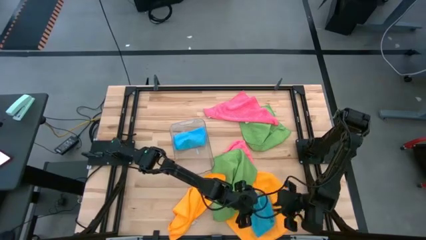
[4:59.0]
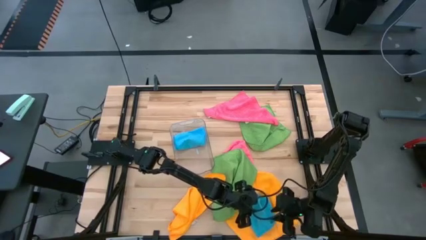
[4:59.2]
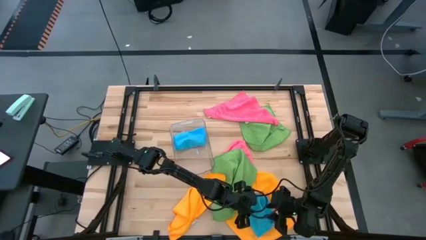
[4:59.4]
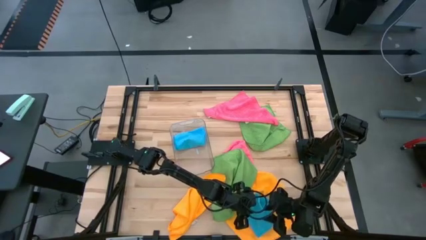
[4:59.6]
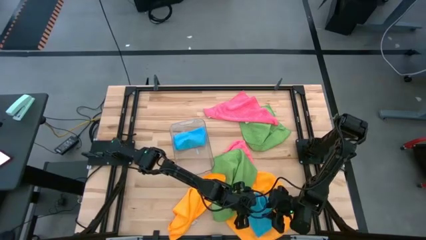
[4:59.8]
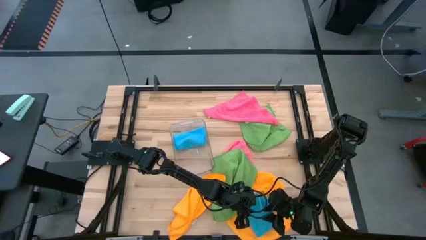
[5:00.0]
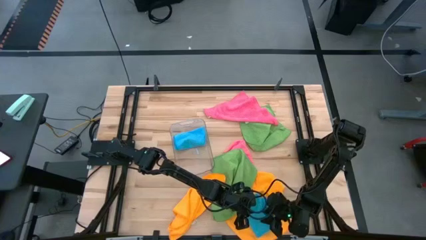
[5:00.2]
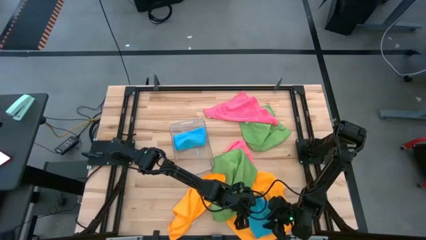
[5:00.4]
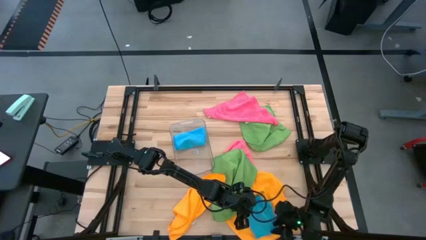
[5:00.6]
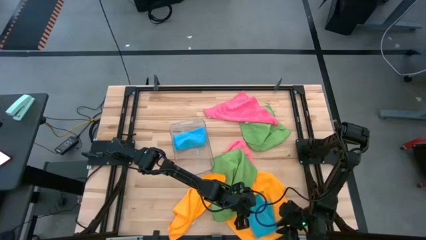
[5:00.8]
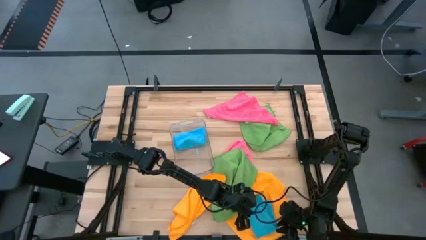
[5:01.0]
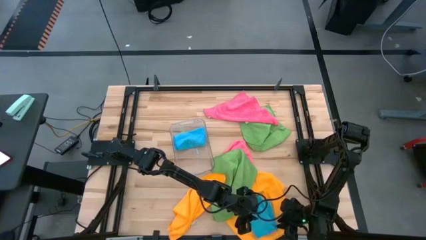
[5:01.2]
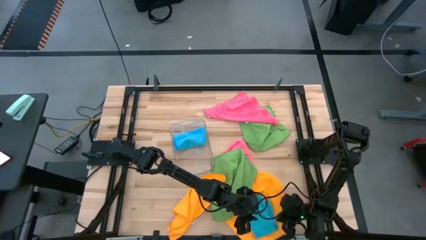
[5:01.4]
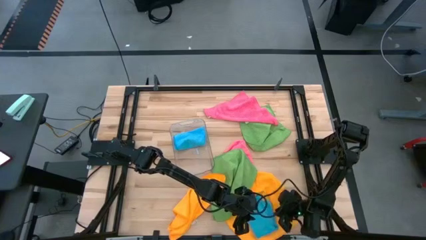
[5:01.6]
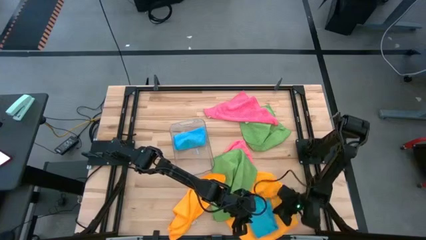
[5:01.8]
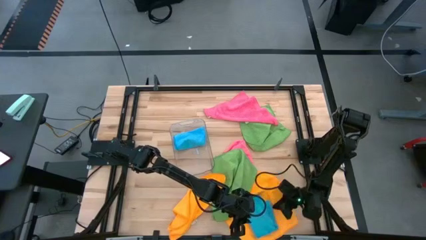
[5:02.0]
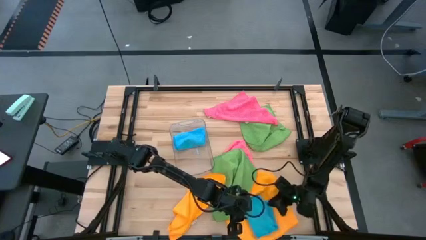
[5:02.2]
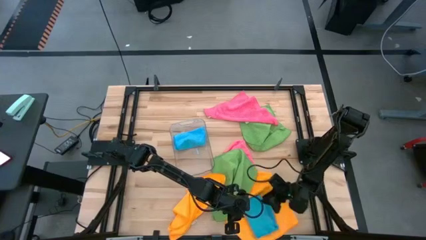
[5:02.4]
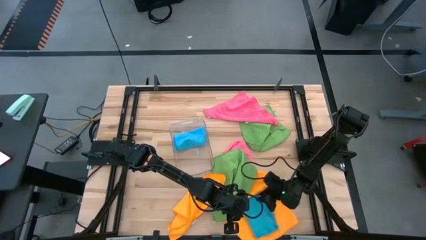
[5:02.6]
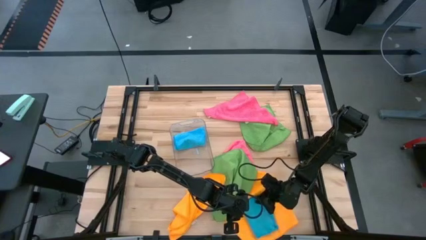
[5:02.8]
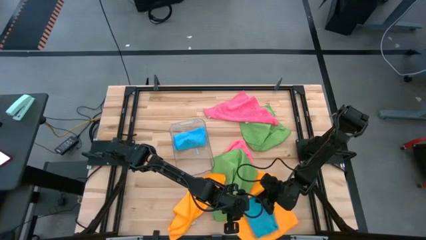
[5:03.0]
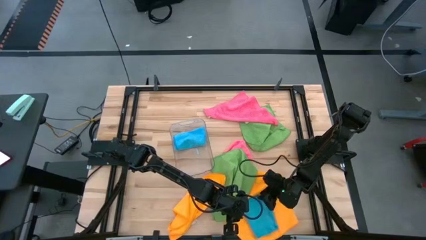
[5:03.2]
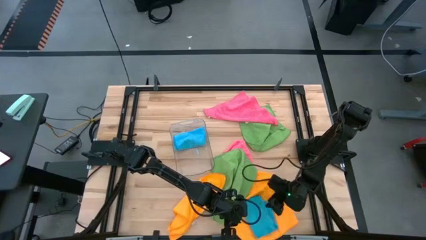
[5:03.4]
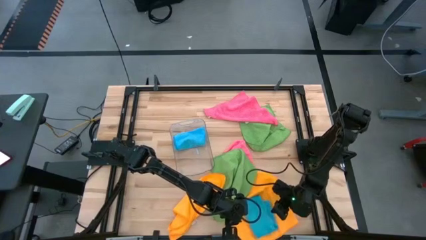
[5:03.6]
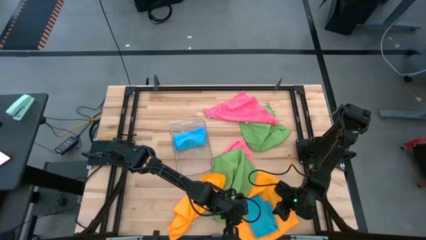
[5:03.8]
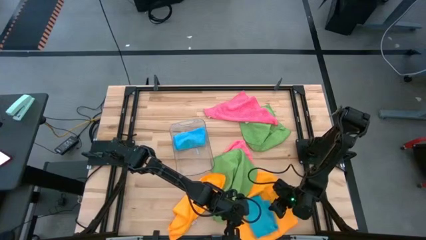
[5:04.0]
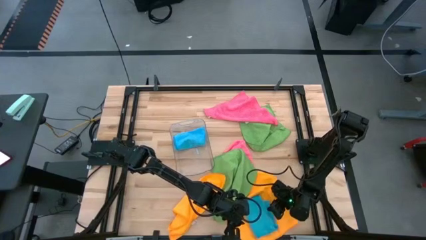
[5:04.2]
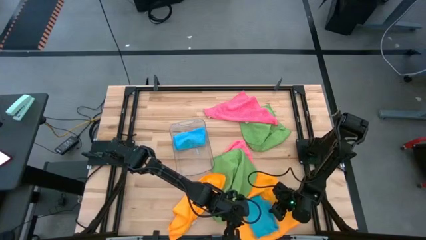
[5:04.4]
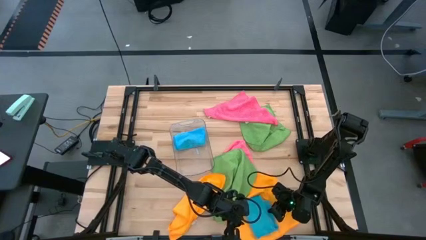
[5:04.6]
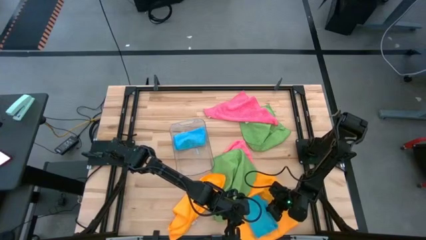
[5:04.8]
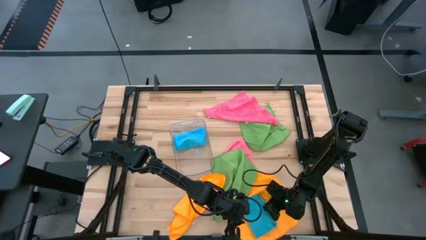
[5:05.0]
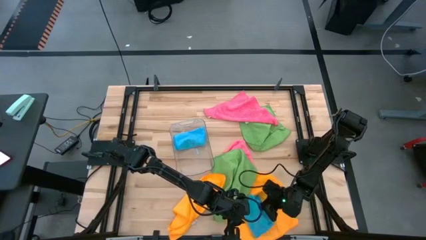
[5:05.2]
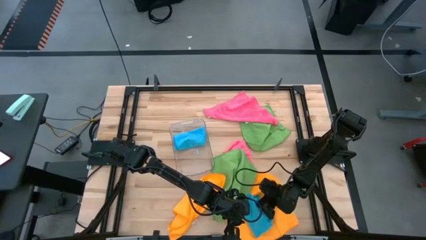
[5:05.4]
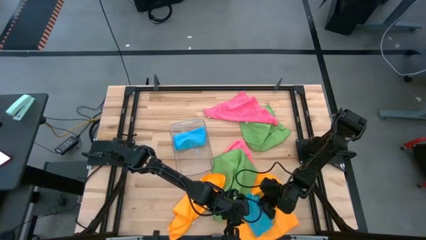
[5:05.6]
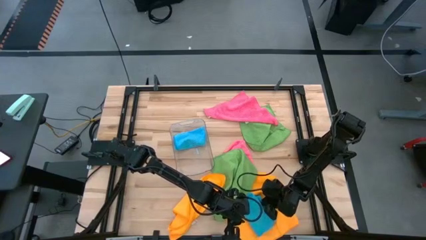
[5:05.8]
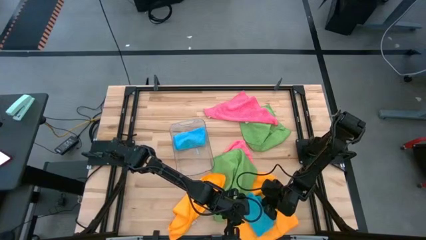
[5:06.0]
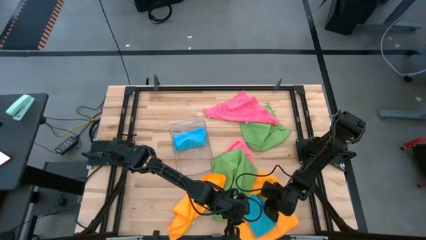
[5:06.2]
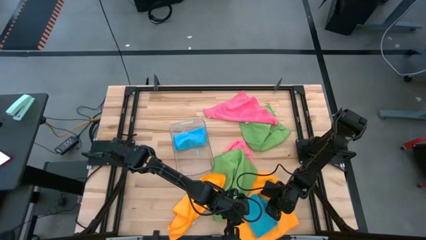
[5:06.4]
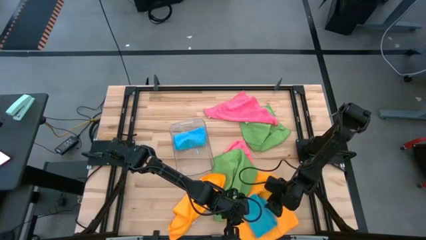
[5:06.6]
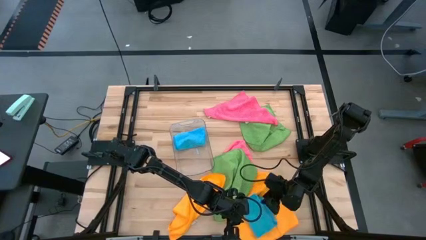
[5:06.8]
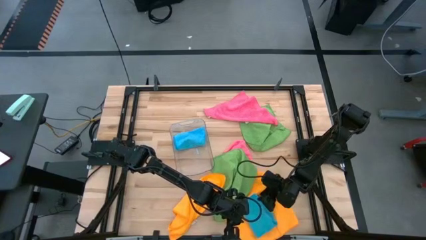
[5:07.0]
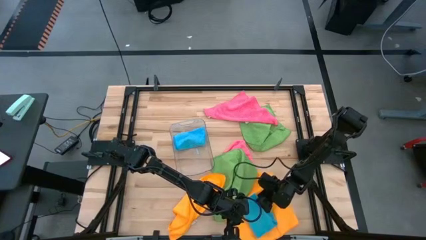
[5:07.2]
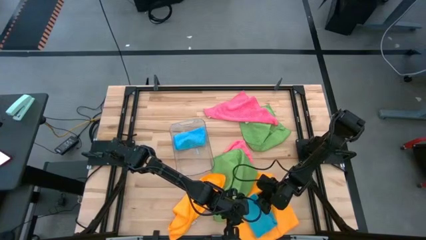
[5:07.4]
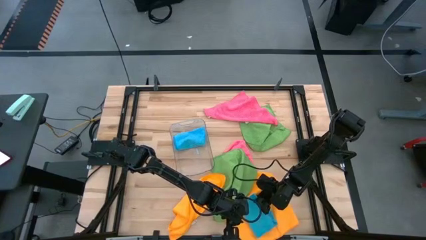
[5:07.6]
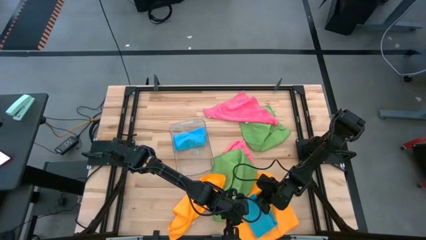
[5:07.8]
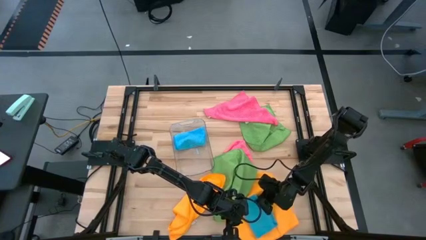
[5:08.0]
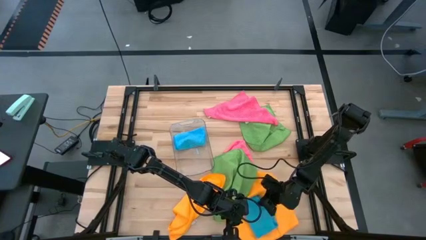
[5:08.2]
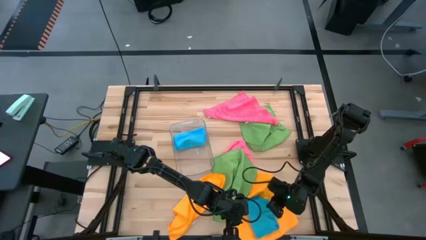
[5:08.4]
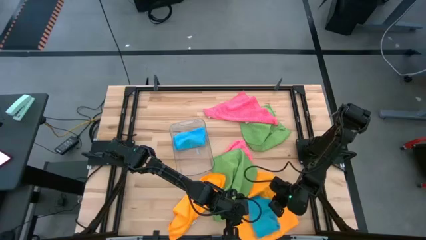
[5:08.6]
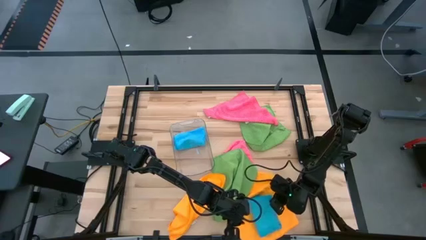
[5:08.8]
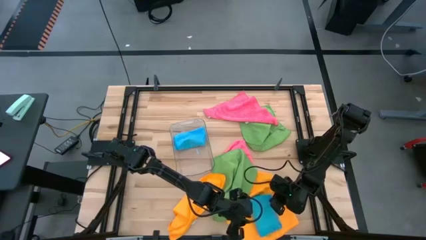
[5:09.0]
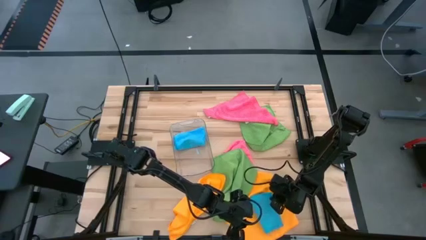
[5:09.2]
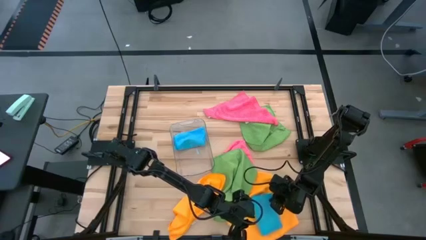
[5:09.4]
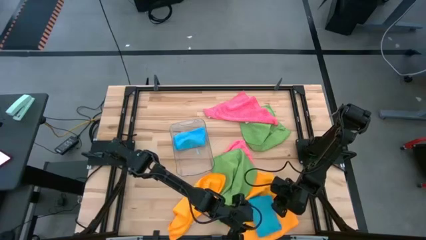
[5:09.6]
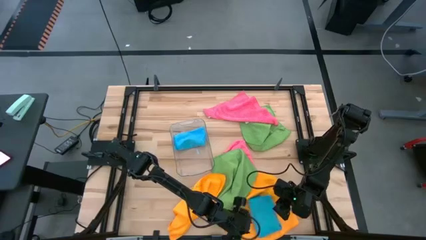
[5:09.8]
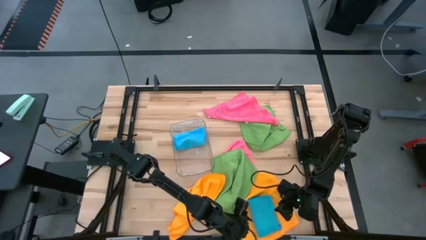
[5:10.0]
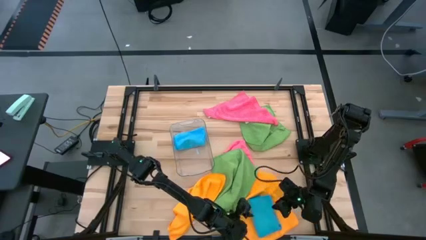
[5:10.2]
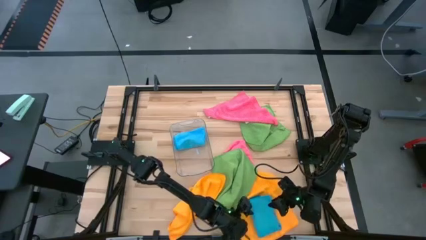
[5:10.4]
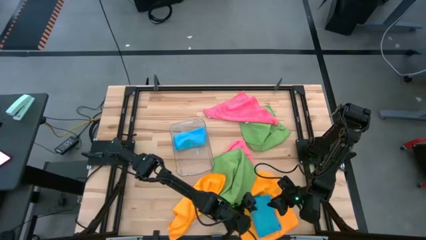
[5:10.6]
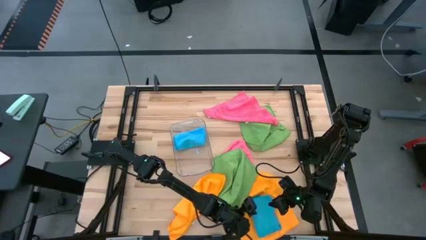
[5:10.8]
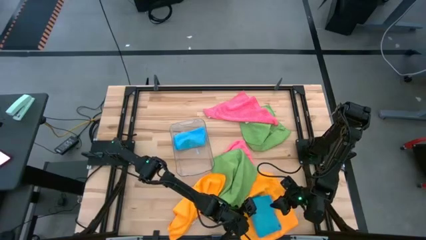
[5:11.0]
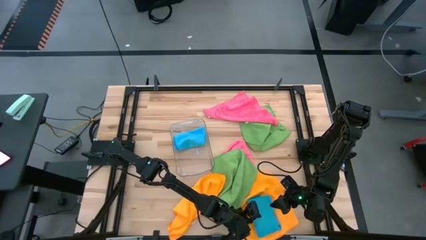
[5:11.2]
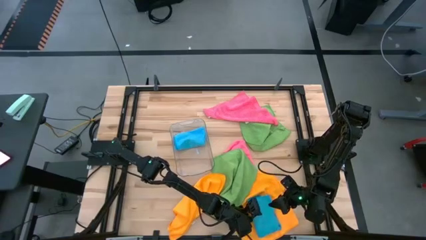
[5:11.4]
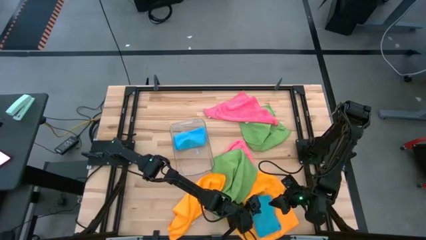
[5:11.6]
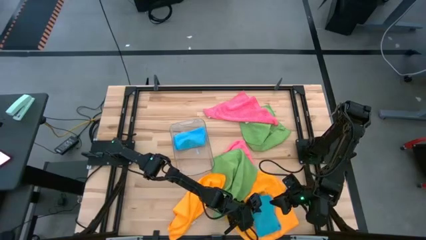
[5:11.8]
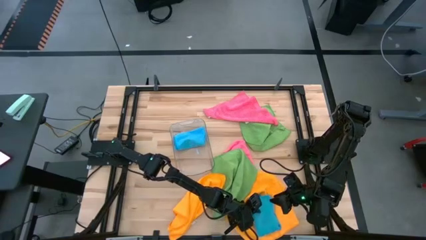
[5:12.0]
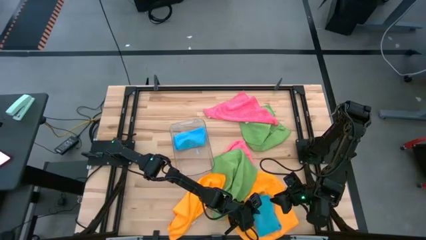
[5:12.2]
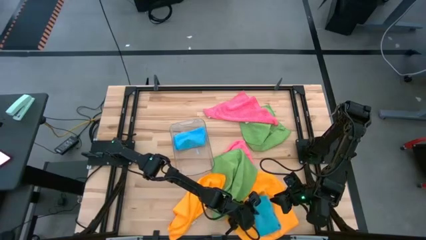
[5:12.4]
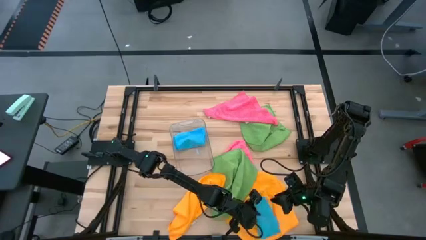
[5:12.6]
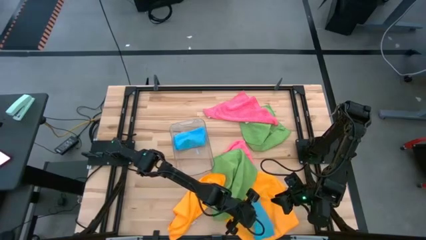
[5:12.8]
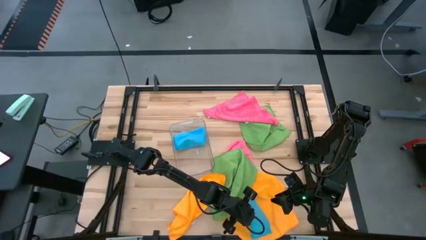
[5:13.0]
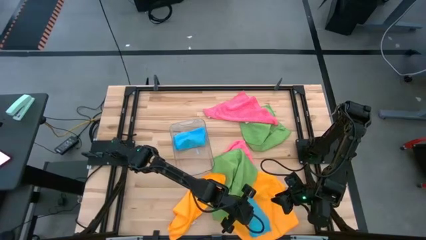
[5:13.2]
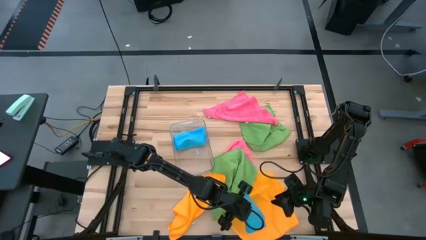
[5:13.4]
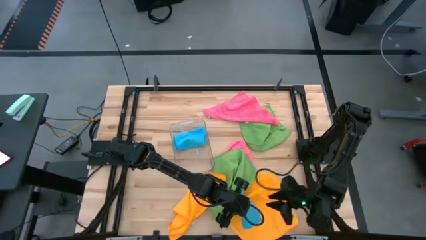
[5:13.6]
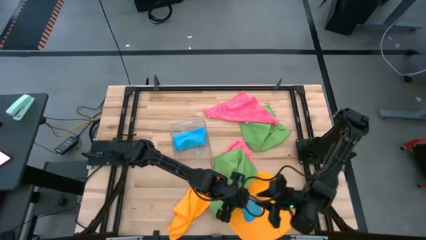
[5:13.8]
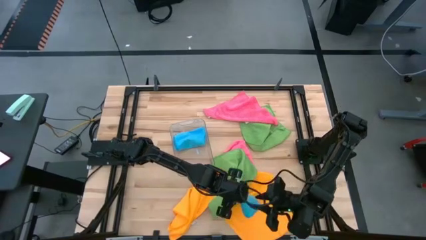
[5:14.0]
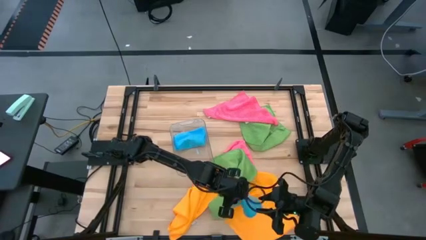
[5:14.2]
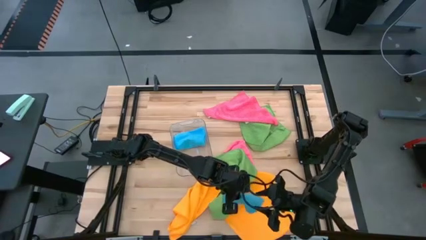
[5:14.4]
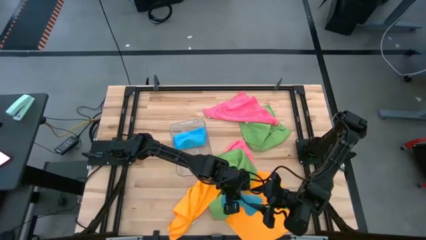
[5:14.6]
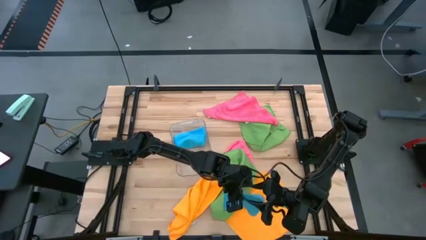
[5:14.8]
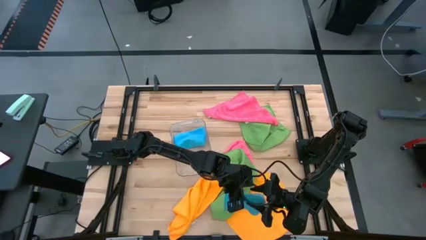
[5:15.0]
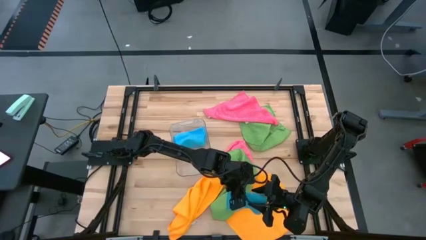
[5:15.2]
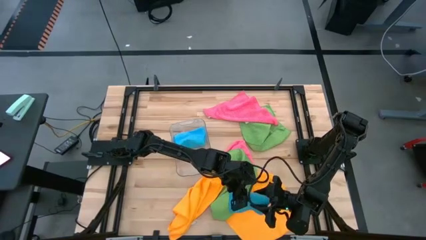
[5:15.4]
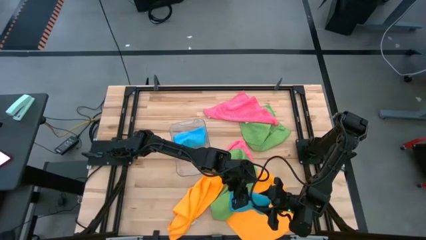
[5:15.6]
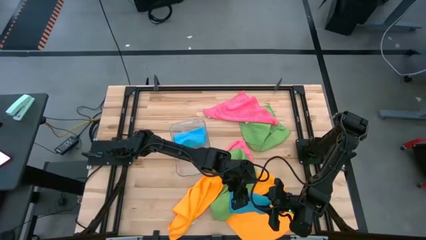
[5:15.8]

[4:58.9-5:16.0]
Task: Fold microfiber towels
Fold the blue towel
